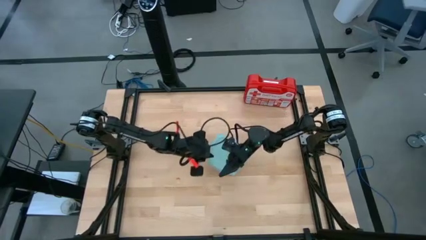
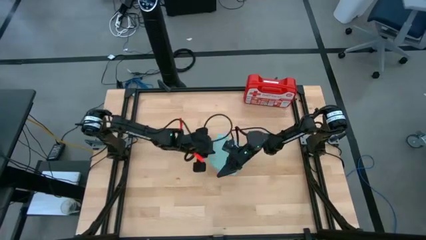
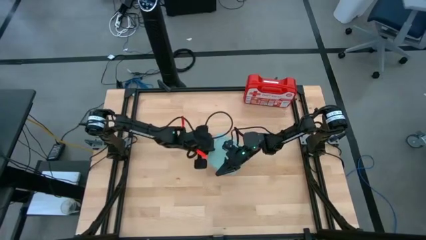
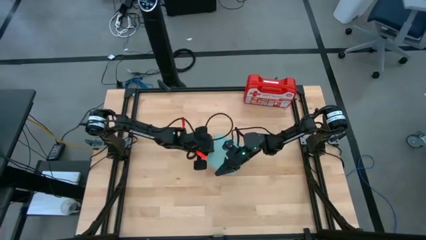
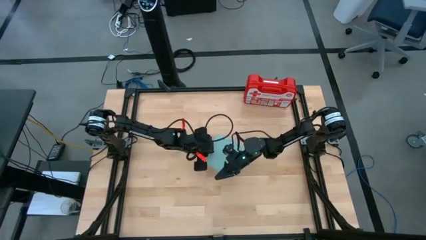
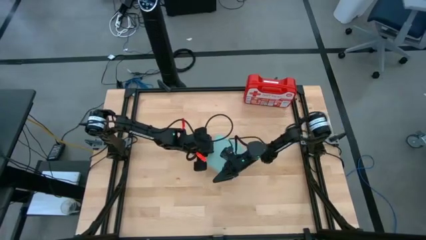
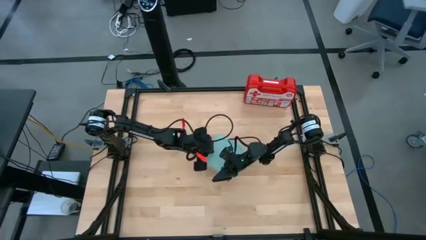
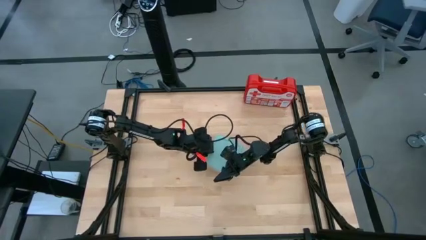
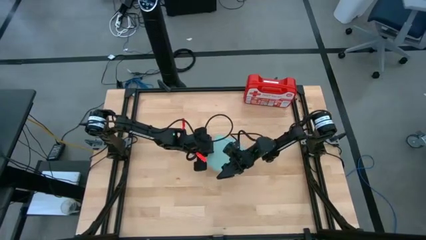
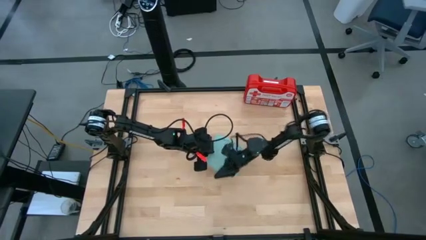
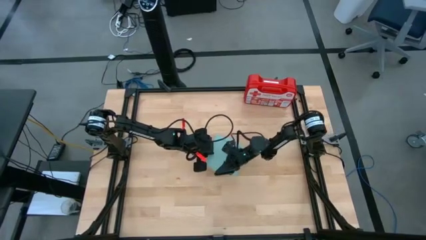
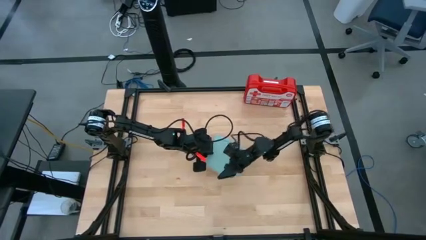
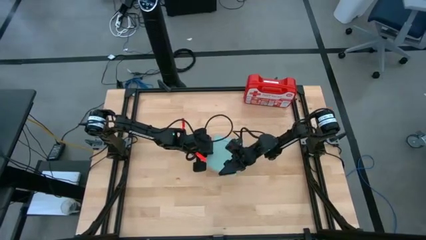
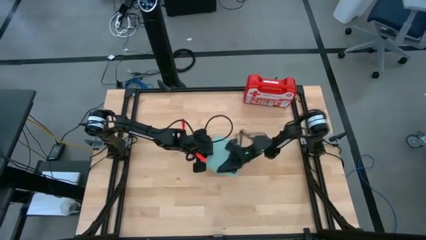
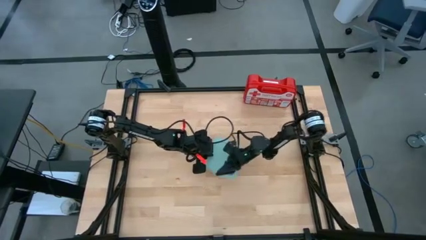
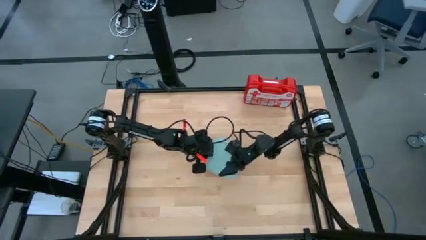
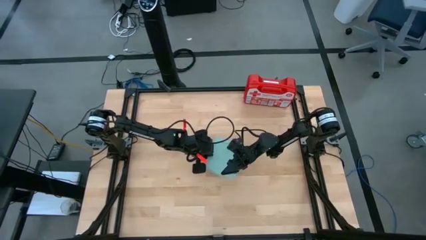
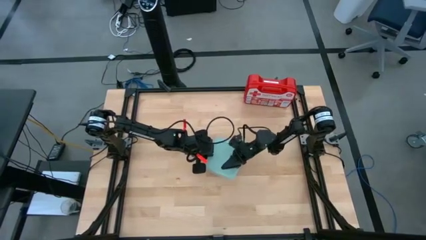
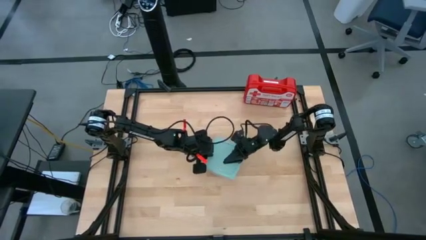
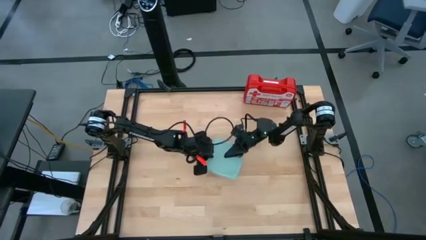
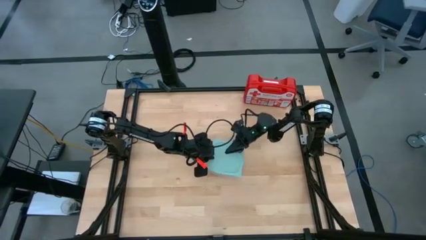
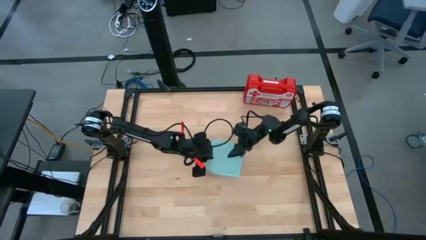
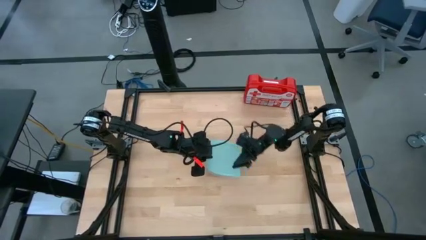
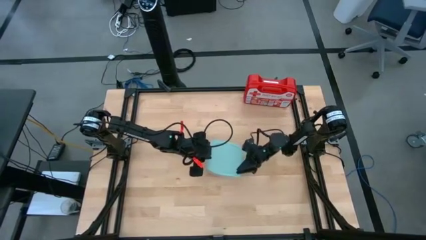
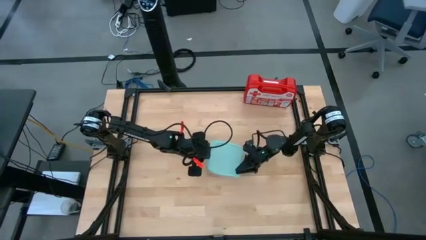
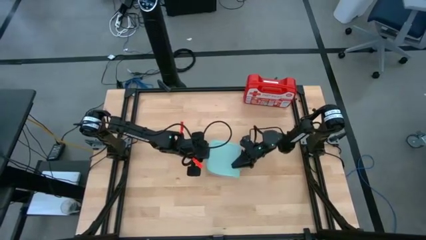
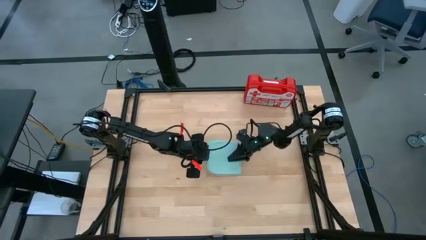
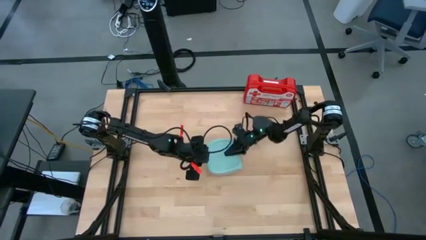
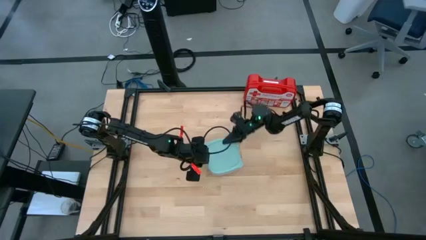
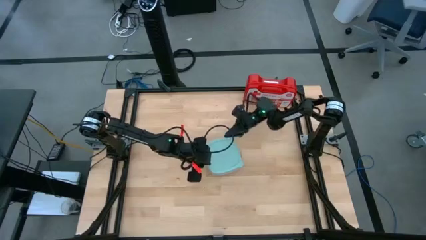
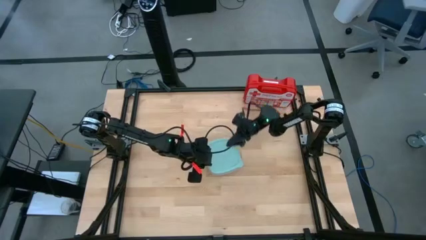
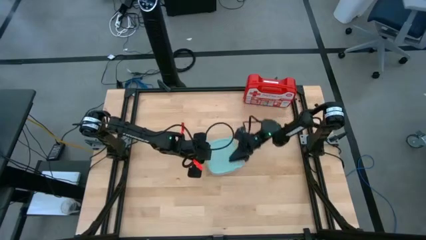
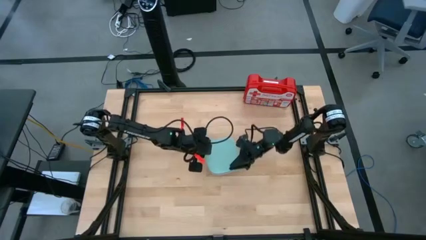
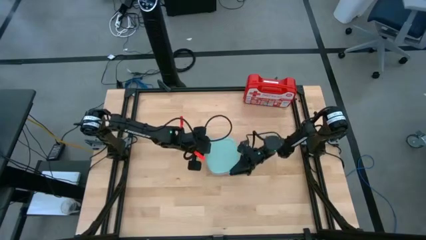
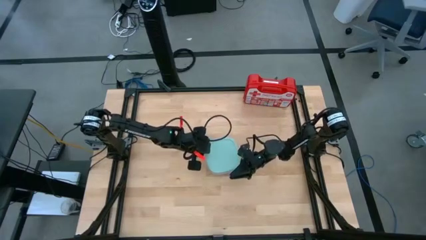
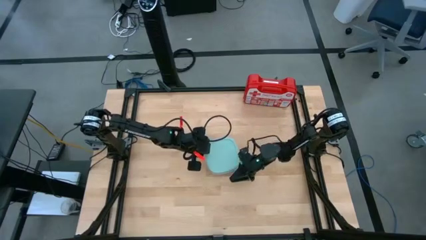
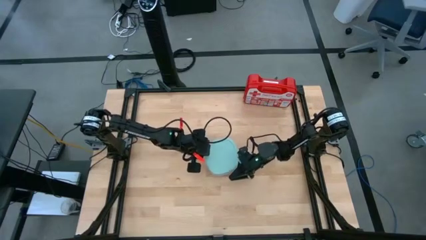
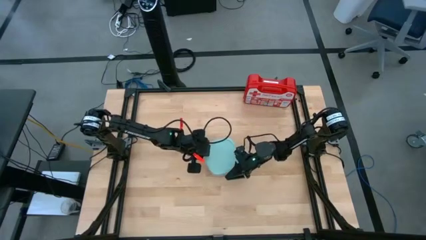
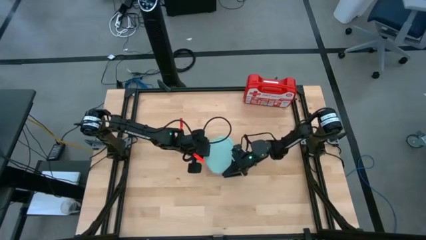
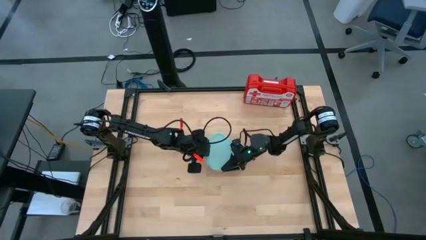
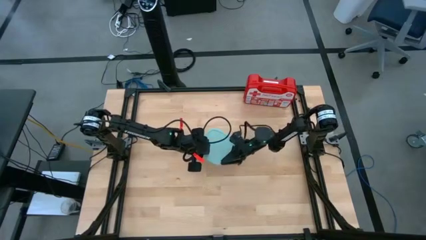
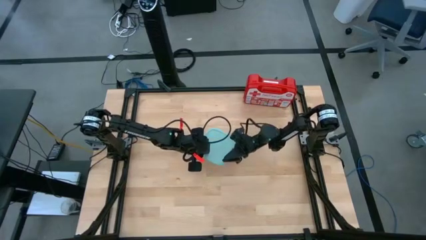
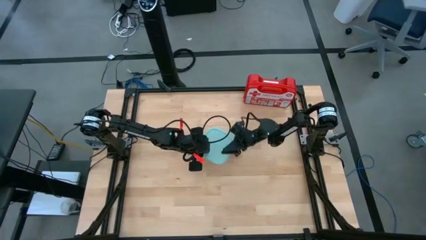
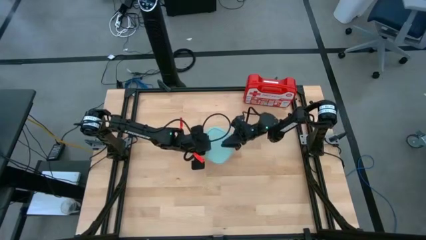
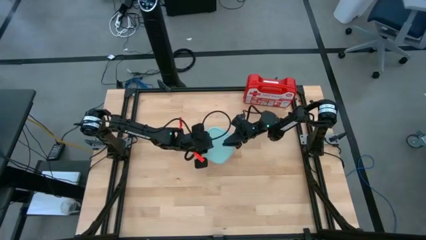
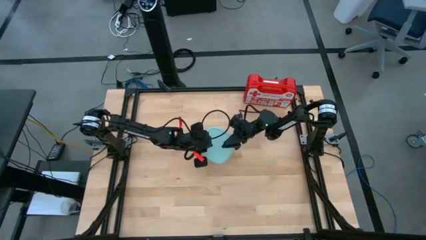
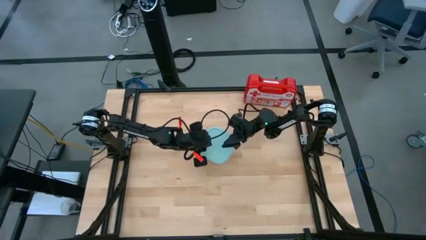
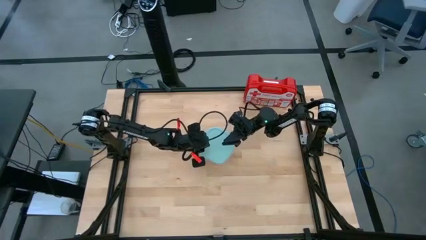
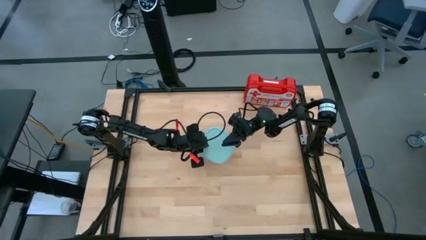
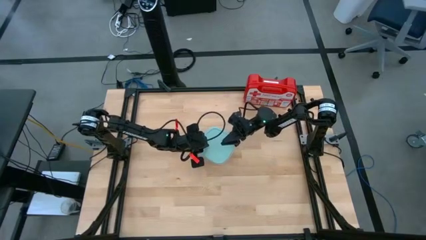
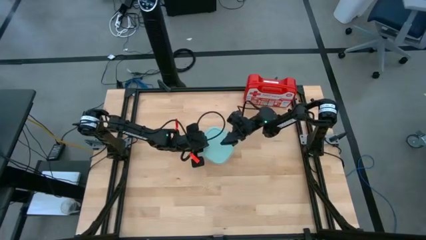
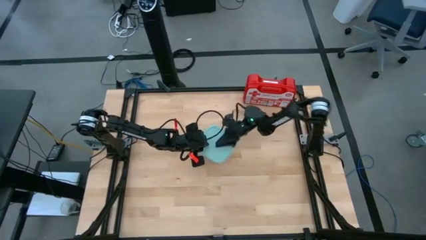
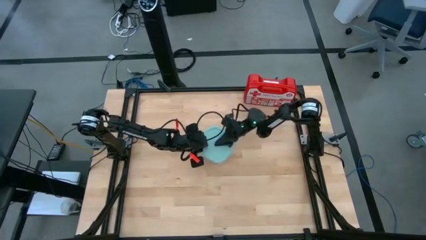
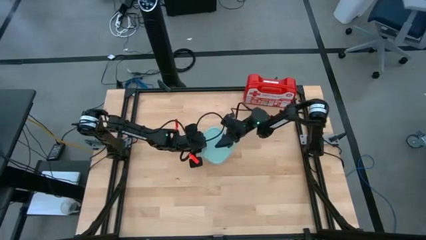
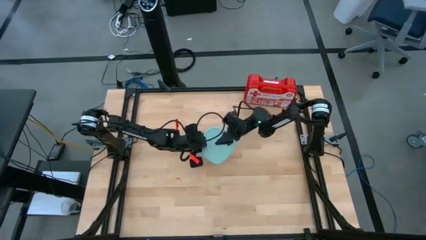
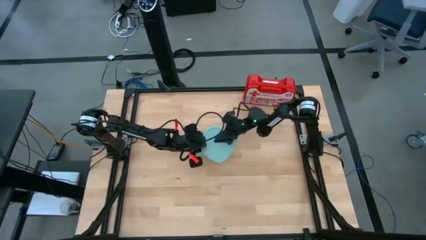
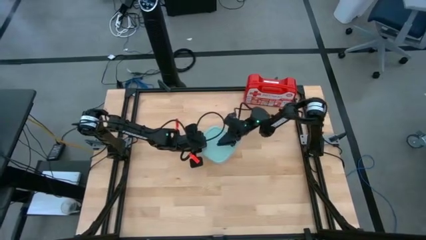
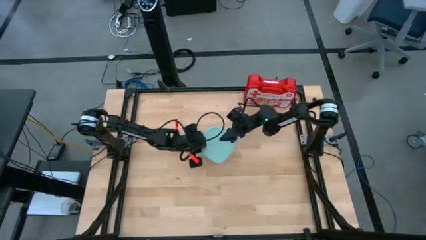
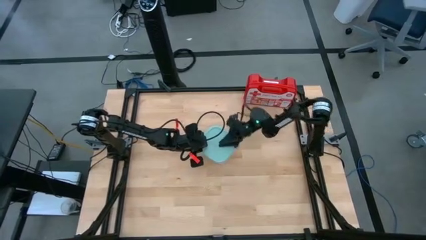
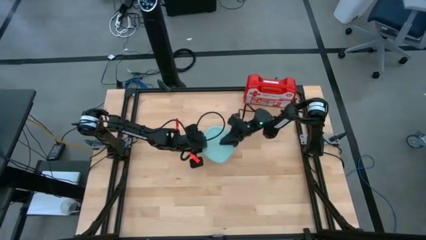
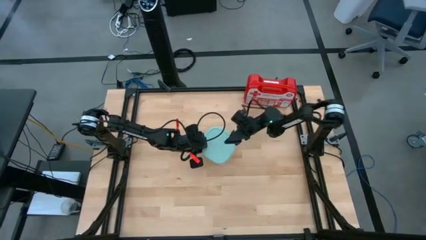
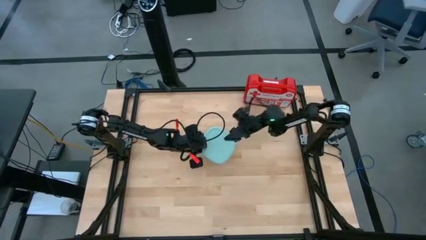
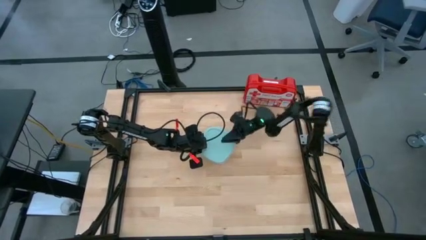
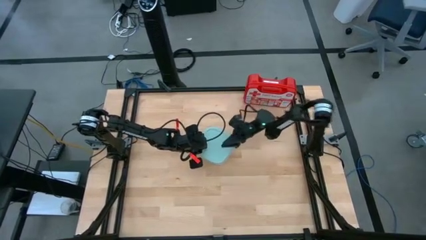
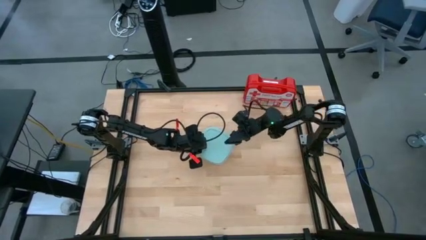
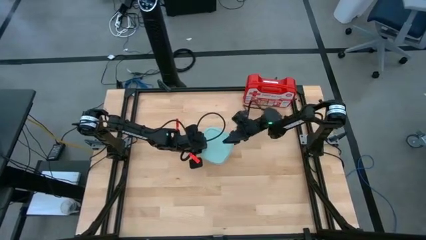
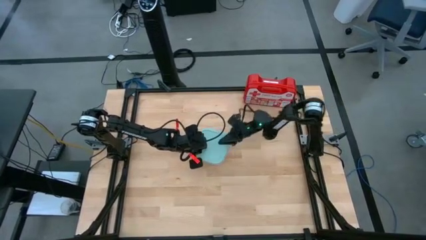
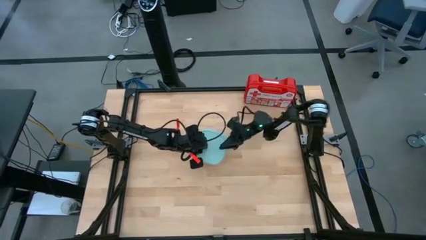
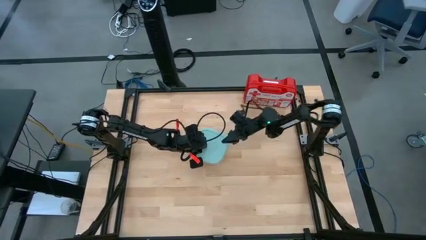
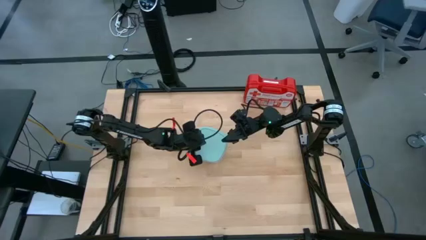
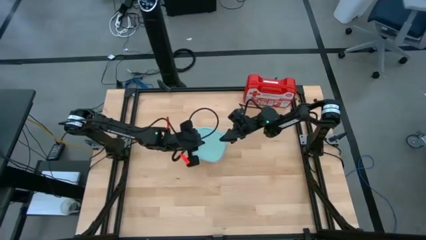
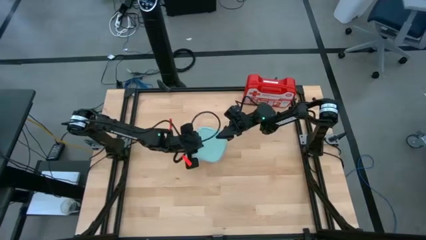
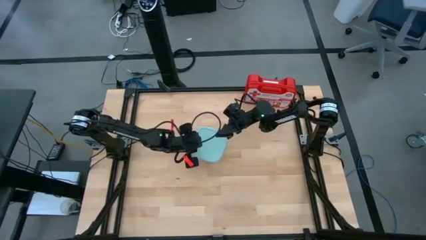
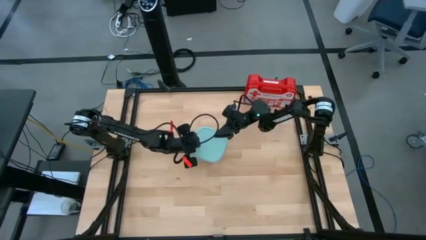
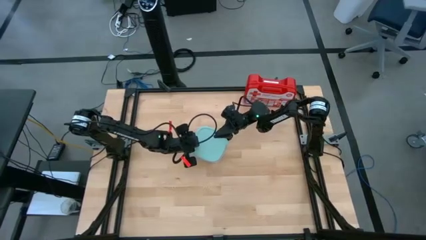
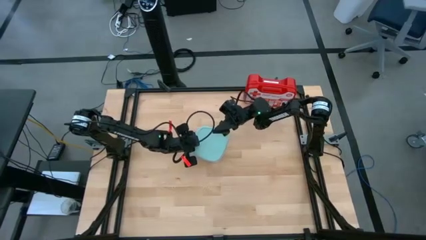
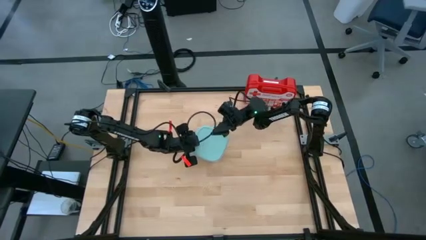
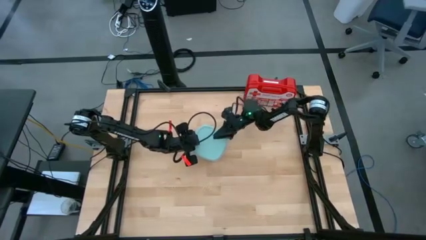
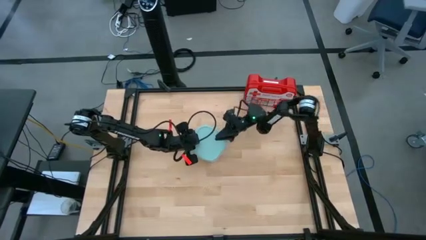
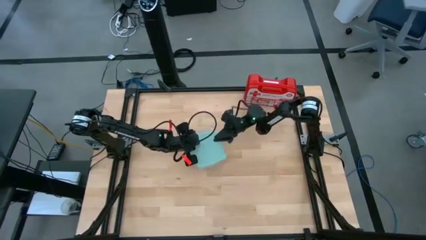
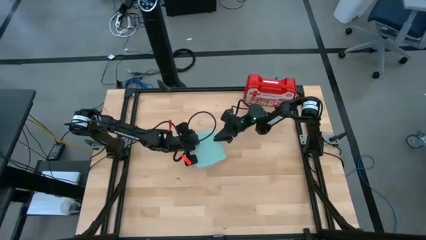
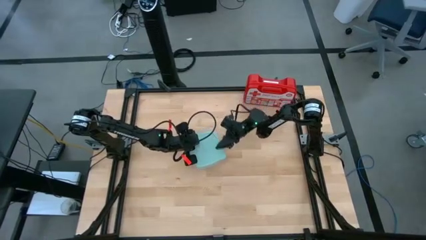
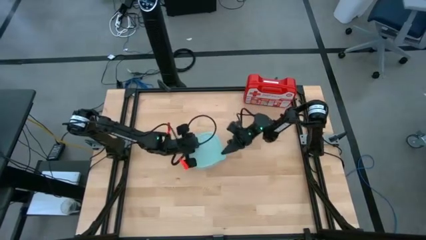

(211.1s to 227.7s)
Task: Roll bandage
Close the transparent food container lid
